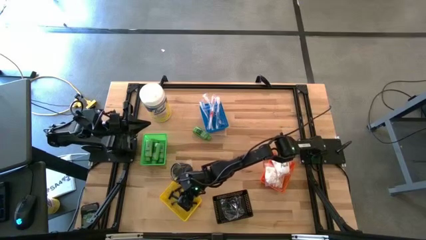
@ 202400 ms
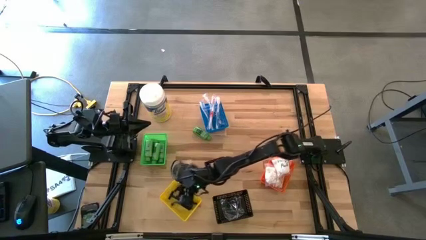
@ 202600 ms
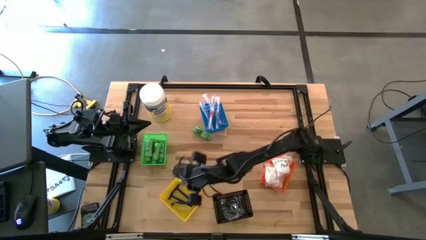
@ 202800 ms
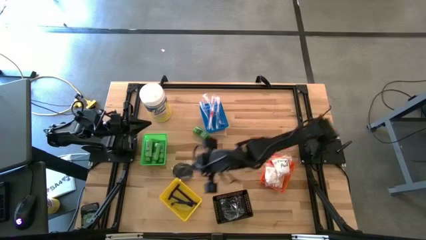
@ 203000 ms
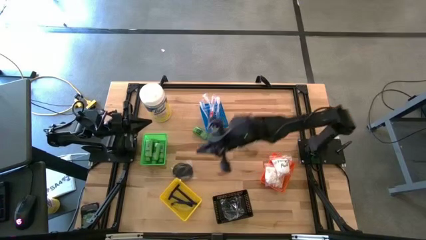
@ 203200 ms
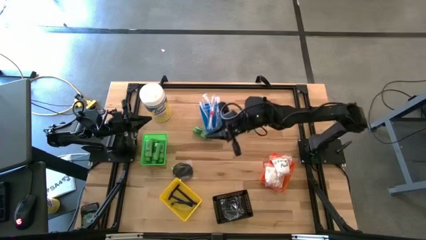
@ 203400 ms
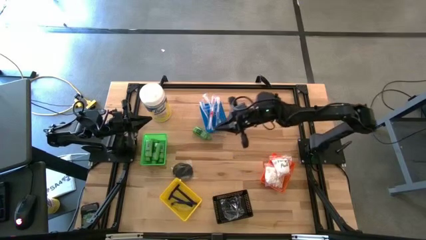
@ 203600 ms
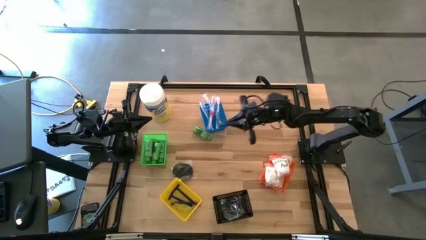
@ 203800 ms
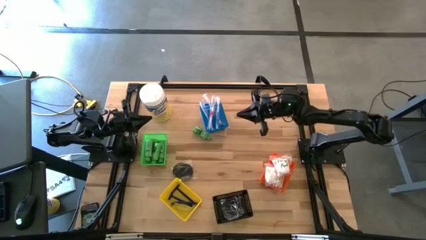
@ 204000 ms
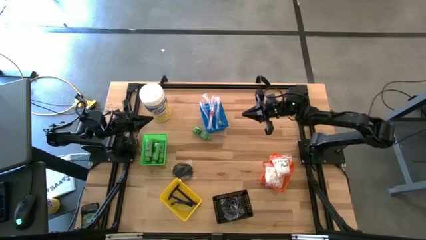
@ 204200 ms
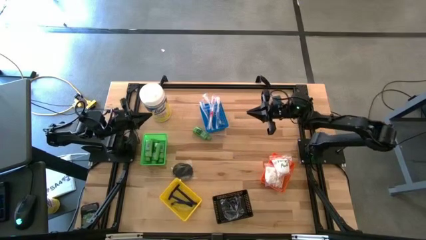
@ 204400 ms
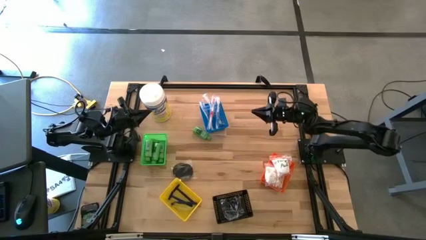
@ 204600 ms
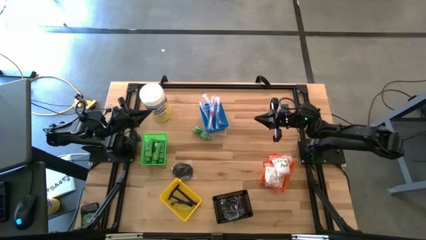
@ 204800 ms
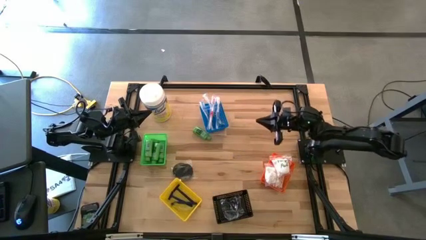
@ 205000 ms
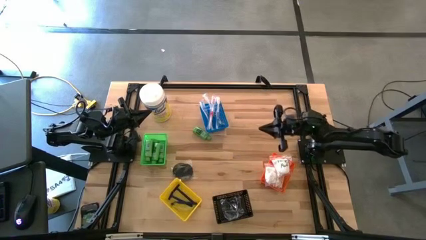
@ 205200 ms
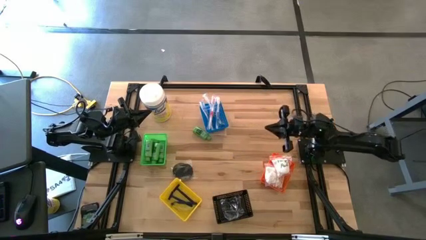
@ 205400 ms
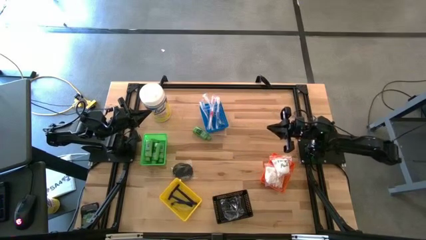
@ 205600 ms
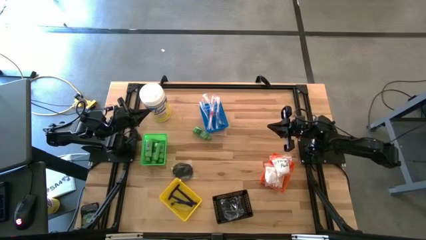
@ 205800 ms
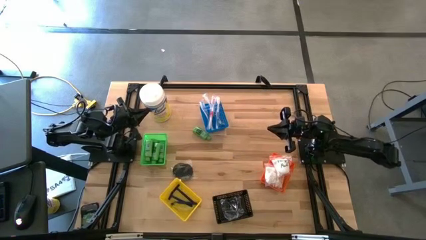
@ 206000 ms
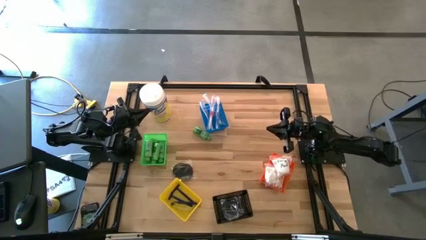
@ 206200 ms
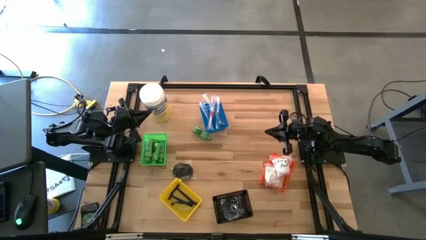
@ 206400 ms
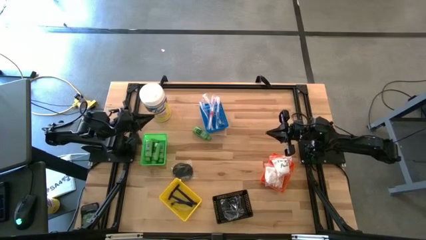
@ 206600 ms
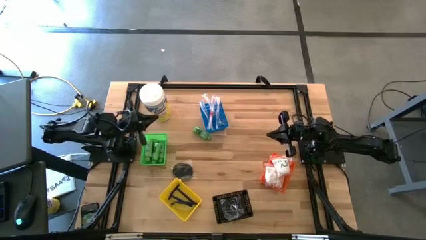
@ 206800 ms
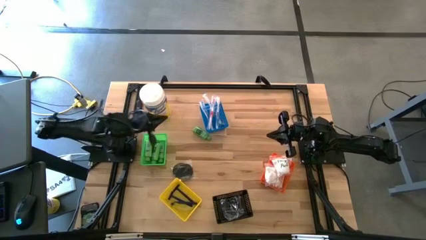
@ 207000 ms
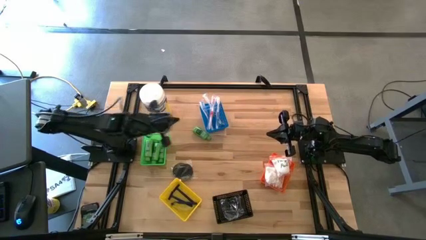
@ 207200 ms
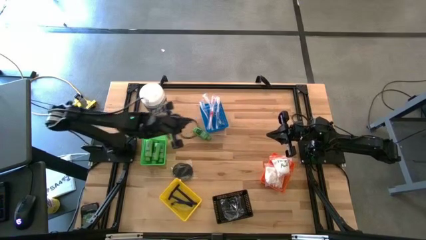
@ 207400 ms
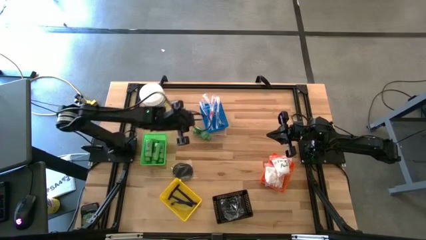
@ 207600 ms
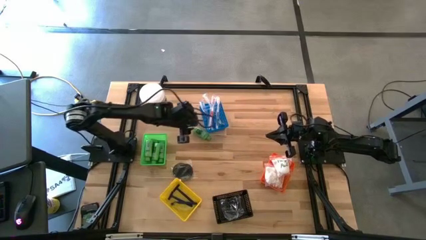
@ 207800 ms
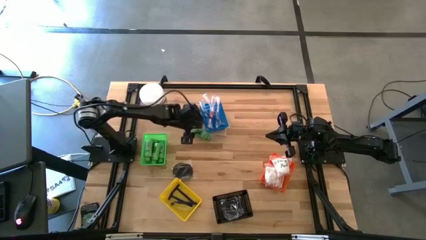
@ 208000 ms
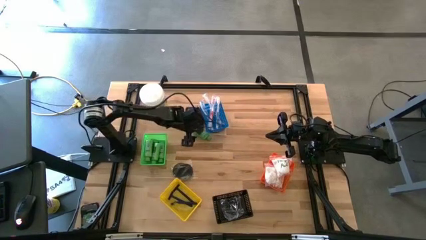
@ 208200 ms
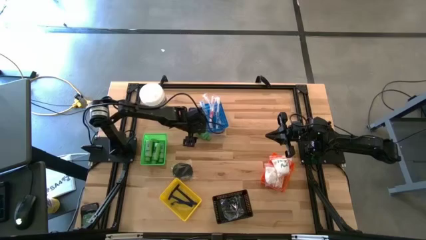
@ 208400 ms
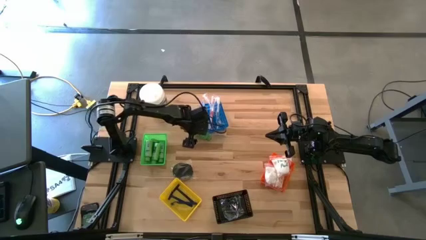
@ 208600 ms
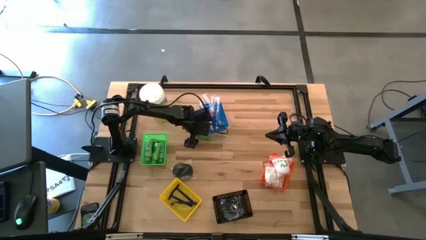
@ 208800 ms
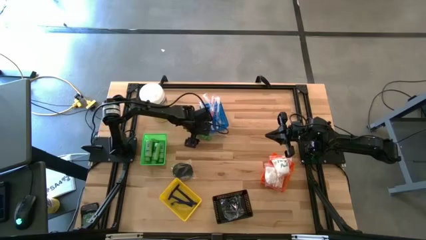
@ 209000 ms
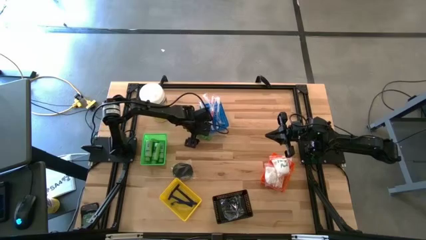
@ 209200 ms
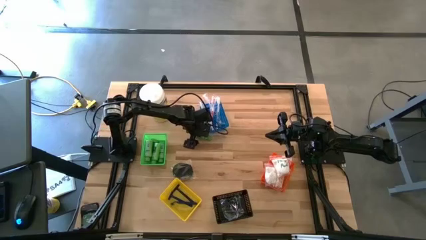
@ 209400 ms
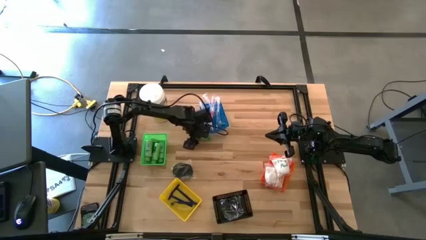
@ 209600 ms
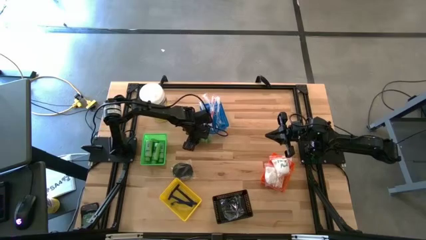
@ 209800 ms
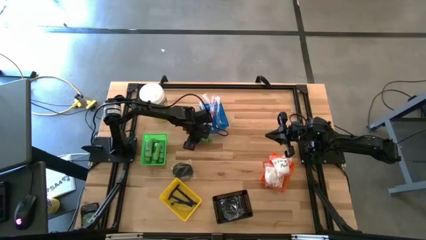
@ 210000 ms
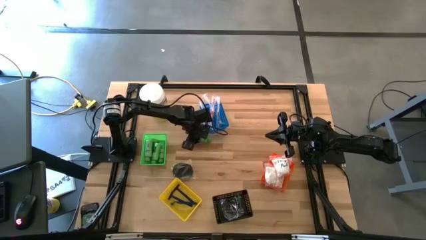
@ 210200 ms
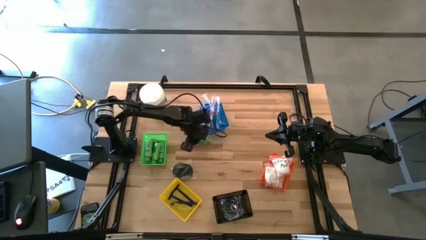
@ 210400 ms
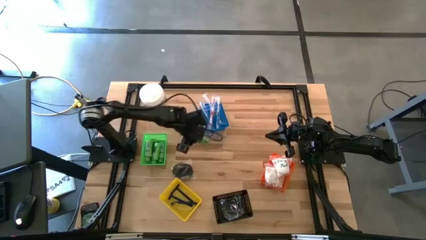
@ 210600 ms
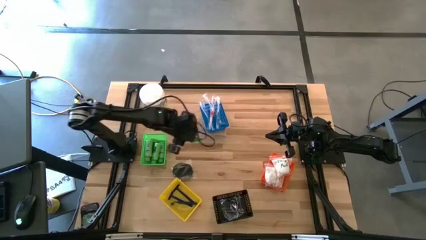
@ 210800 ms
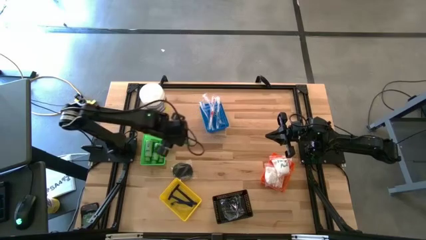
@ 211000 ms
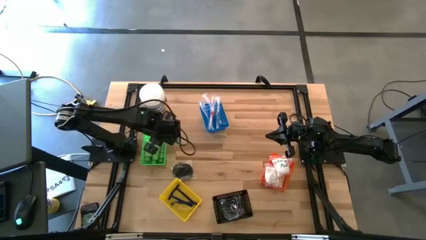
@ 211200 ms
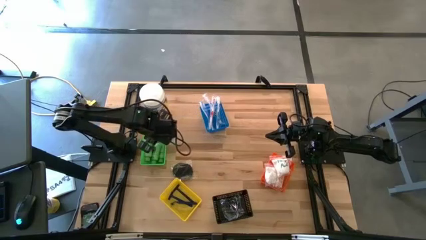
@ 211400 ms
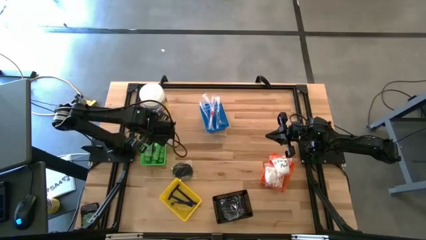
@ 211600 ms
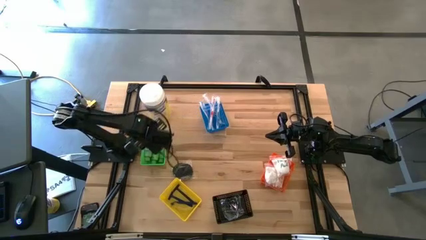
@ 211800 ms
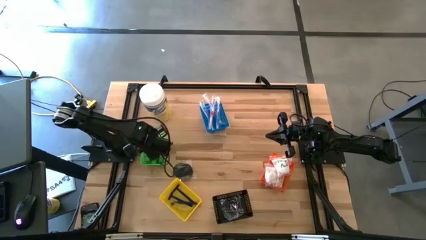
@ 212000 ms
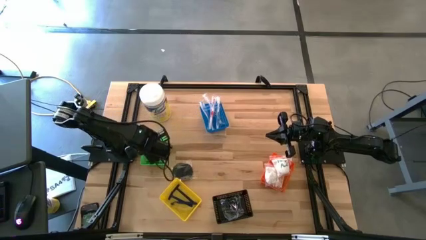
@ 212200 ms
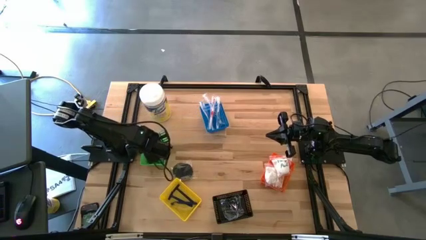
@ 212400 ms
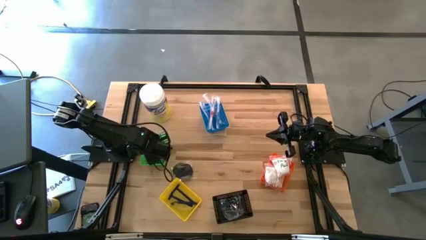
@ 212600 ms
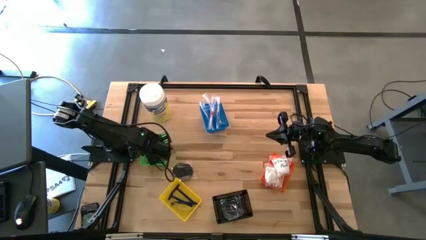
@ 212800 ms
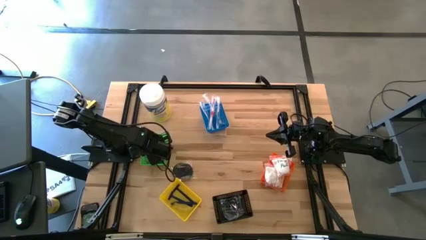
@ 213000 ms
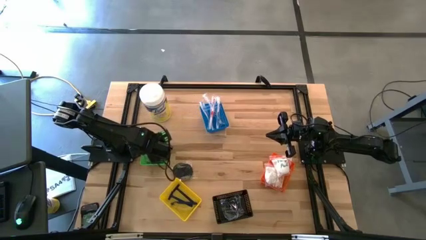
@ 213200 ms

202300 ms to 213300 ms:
Task: Pick & Place Travel size toiletries
Put the green shampoo into the green bin

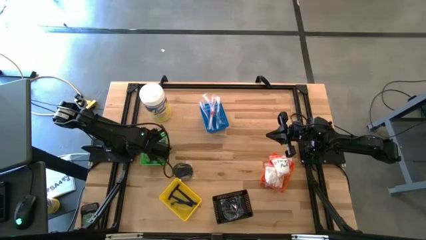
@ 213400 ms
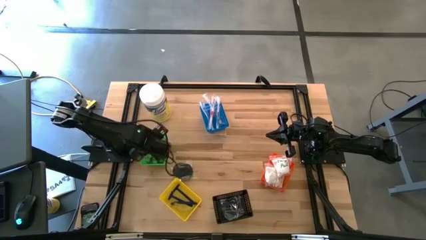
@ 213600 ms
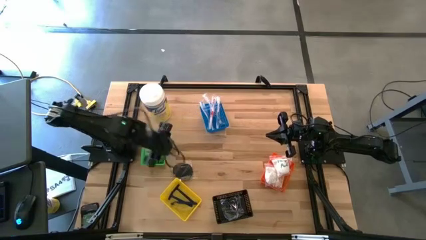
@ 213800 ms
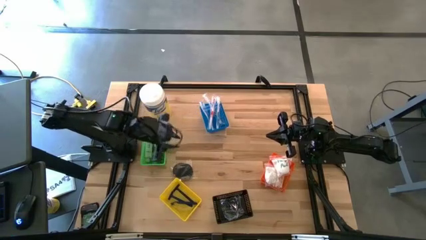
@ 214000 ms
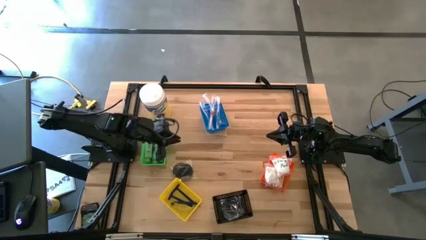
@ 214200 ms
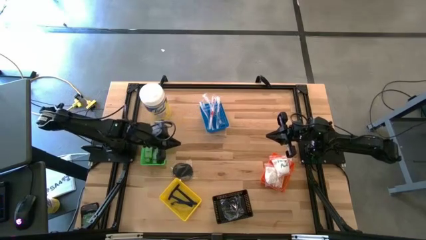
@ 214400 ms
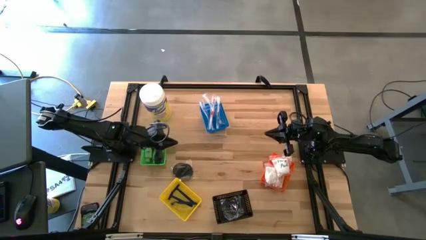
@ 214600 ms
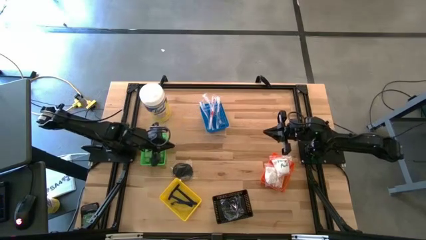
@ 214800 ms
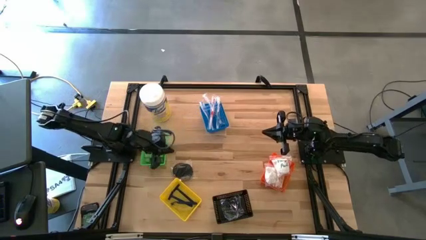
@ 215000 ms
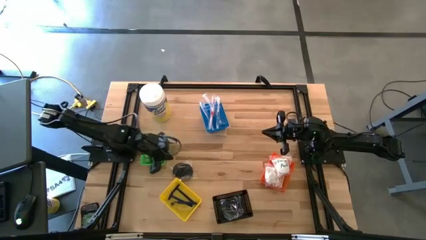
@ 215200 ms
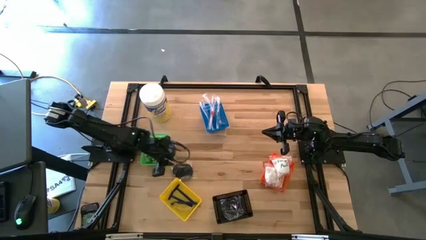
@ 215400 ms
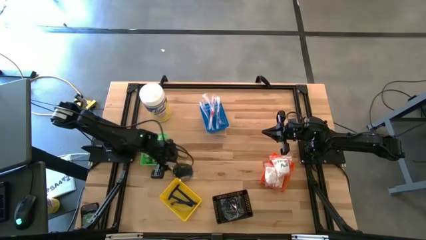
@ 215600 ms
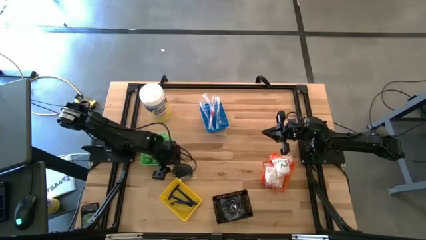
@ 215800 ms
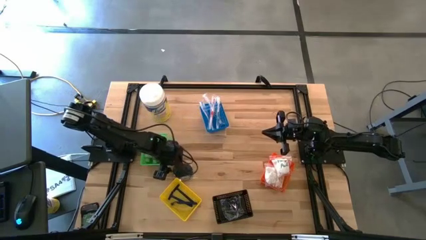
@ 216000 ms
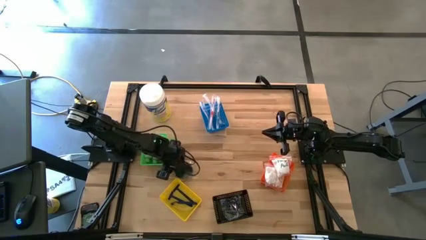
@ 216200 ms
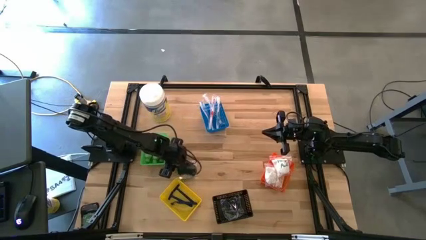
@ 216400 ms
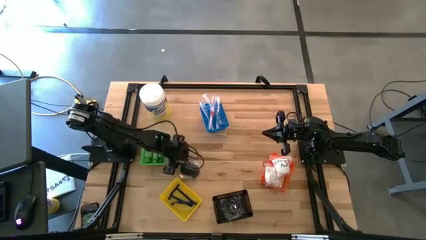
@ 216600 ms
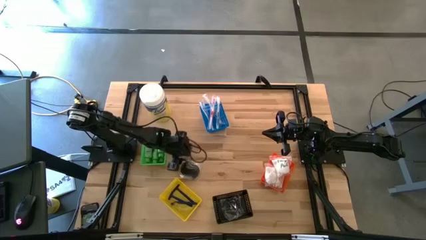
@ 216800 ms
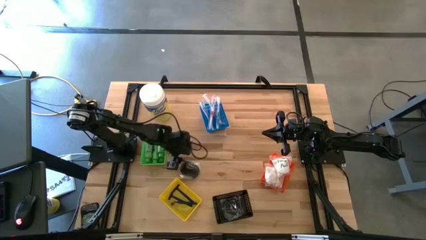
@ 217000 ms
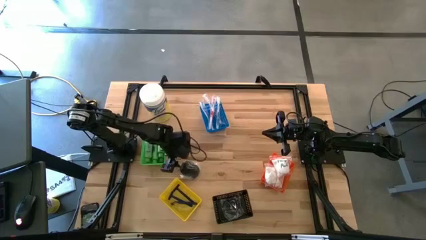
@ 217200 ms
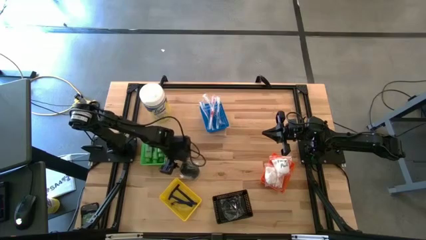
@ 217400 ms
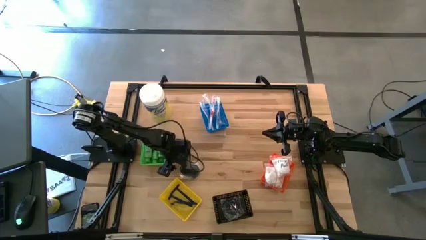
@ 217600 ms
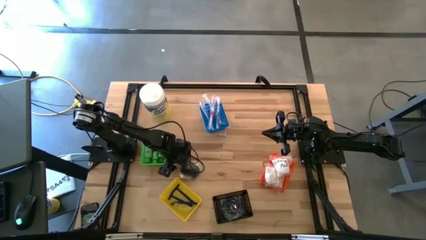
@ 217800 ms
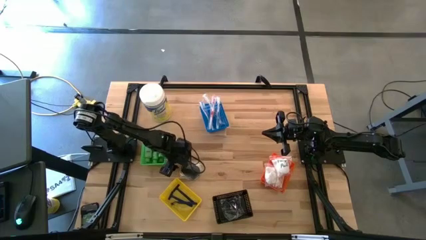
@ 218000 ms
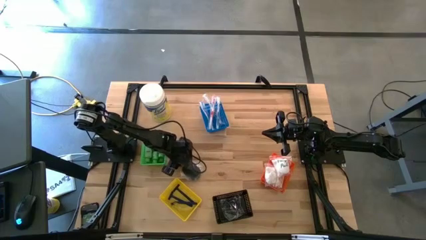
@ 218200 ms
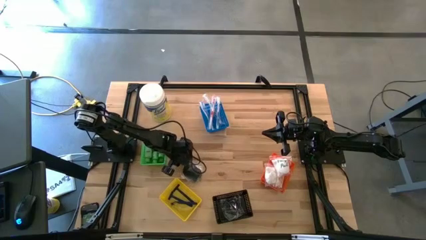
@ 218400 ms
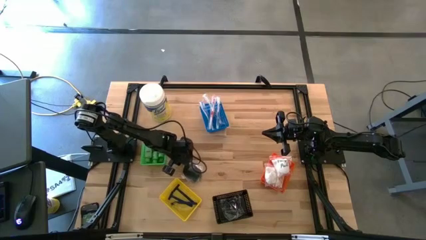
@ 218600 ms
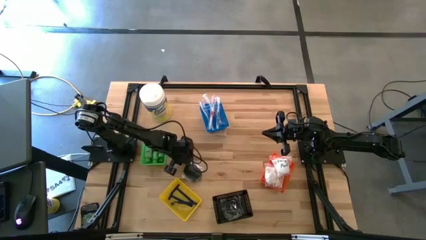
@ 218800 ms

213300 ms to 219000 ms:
Put the black hairbrush into the black bin
